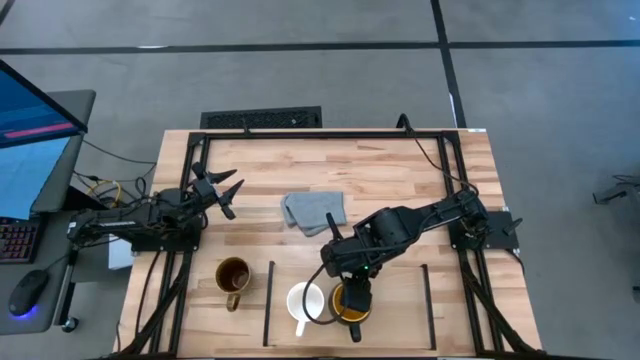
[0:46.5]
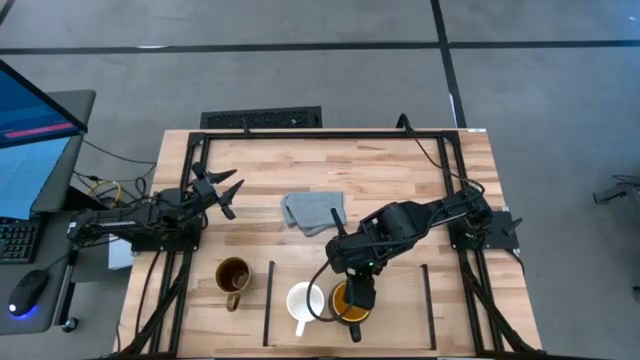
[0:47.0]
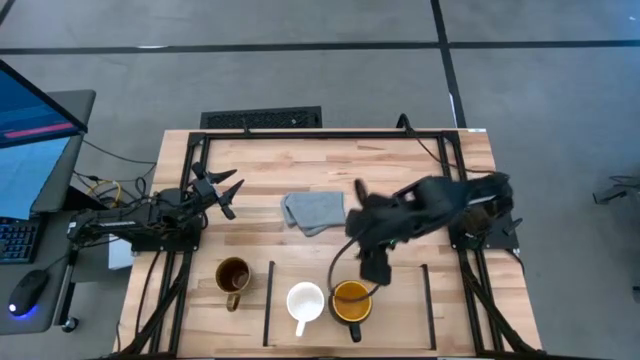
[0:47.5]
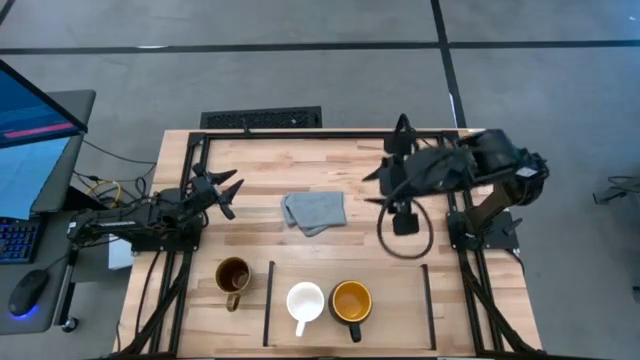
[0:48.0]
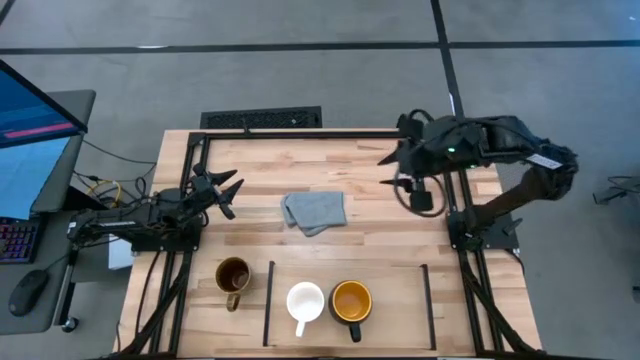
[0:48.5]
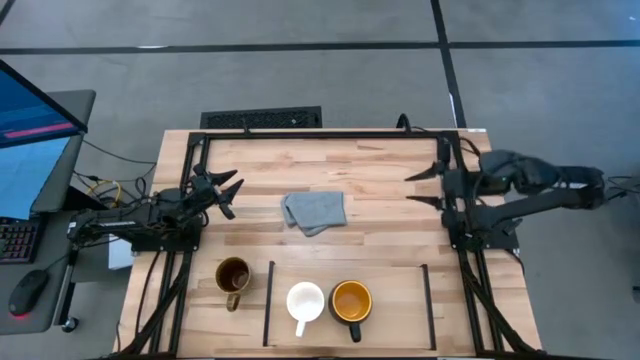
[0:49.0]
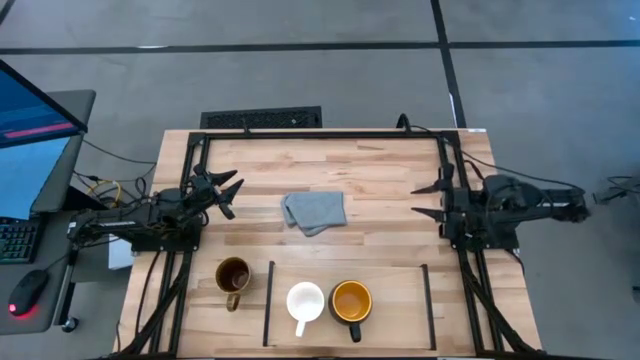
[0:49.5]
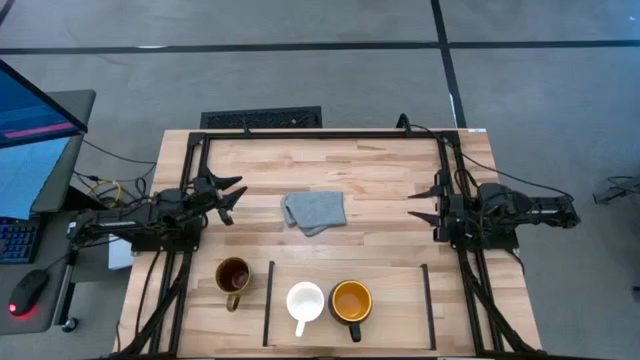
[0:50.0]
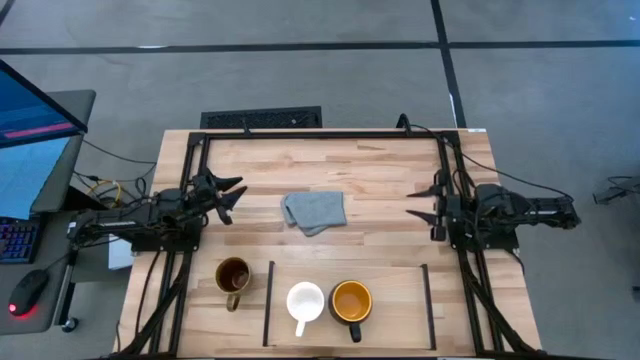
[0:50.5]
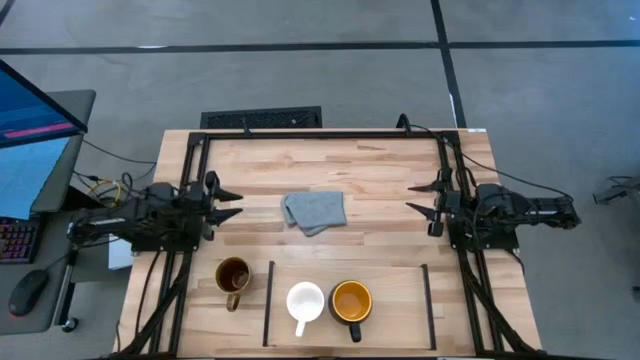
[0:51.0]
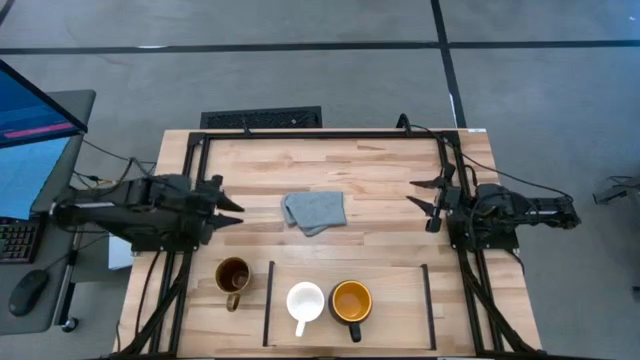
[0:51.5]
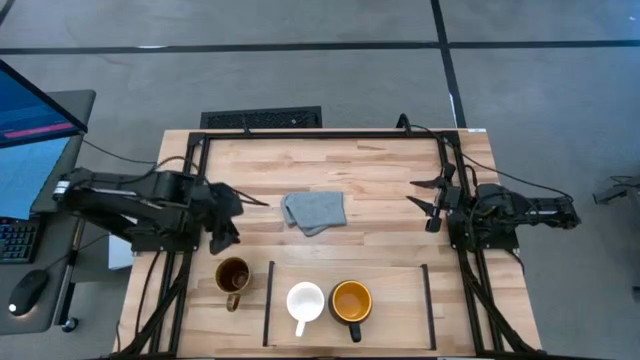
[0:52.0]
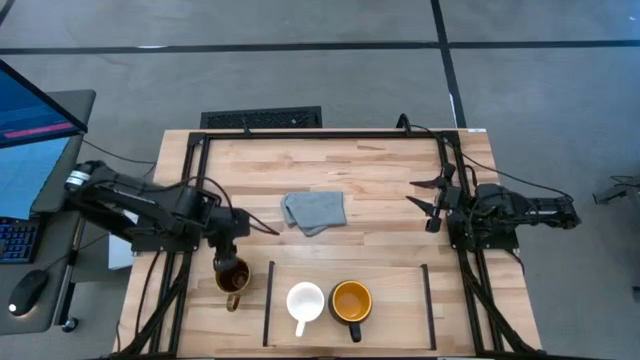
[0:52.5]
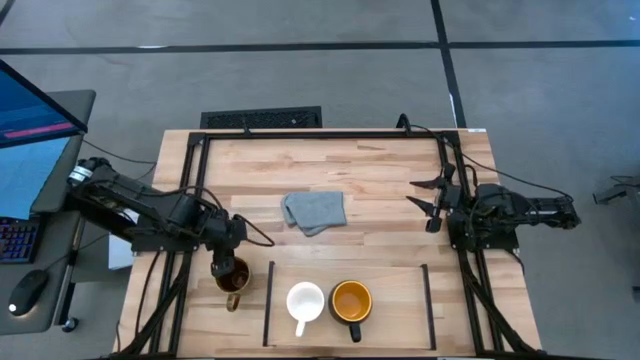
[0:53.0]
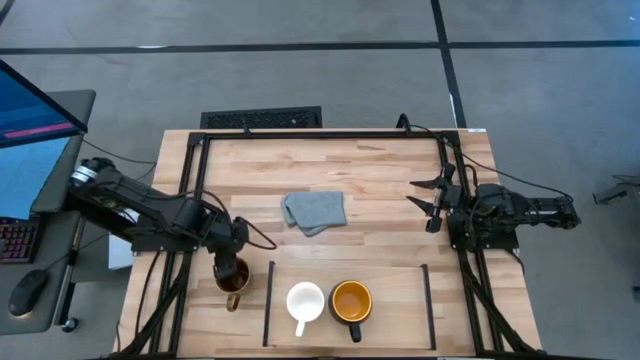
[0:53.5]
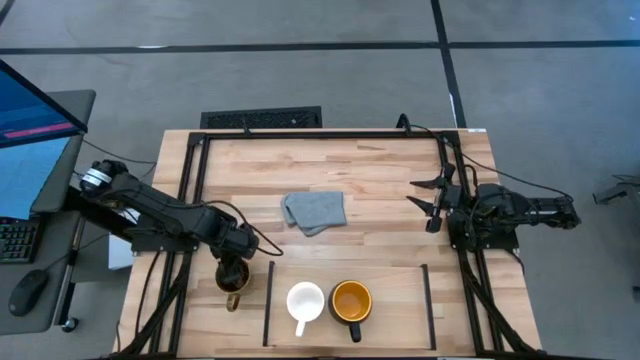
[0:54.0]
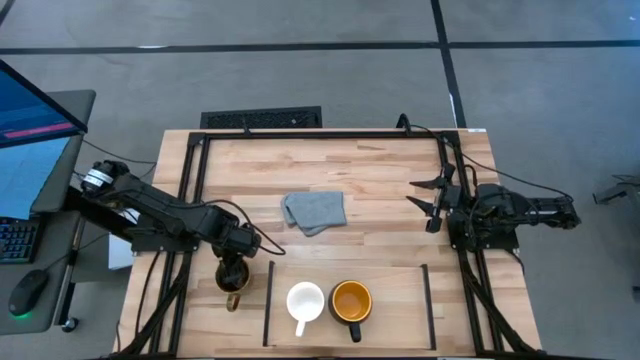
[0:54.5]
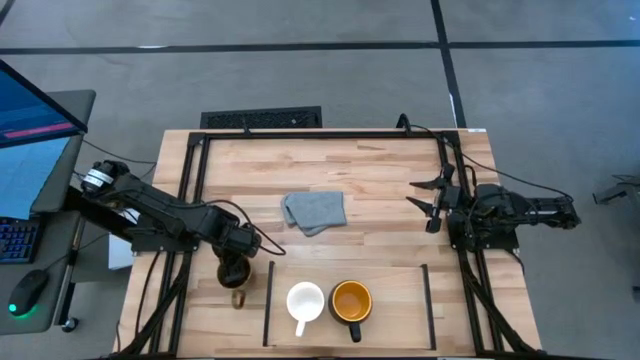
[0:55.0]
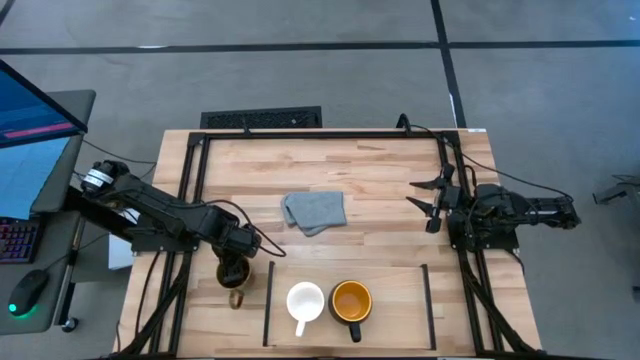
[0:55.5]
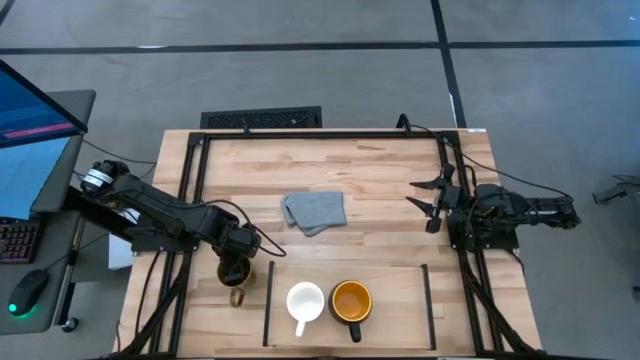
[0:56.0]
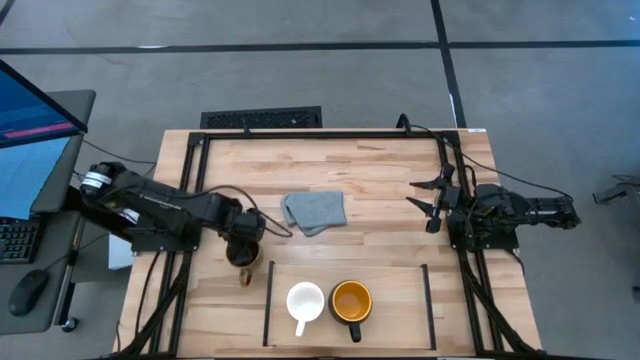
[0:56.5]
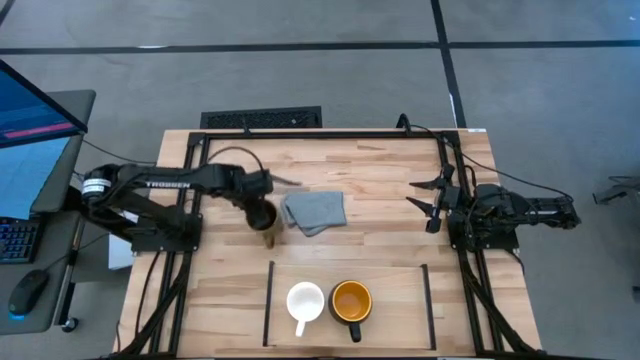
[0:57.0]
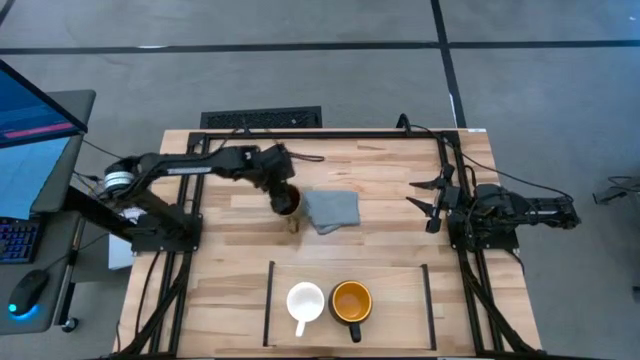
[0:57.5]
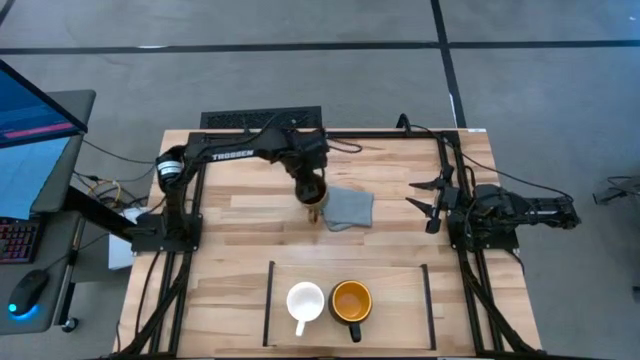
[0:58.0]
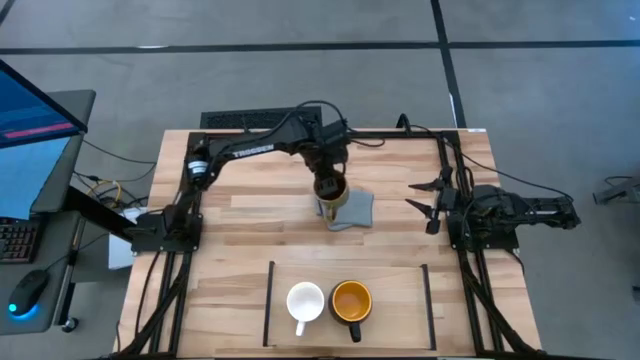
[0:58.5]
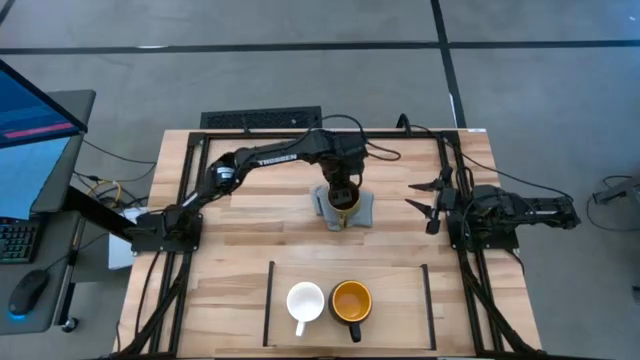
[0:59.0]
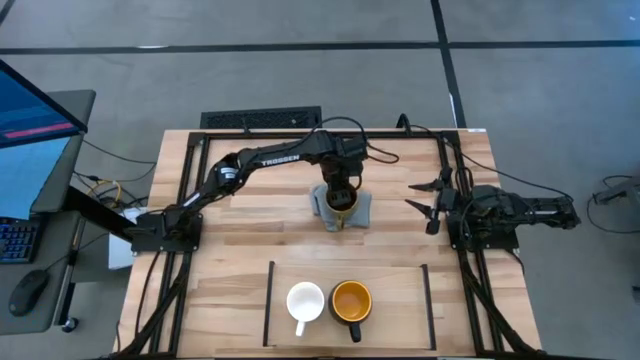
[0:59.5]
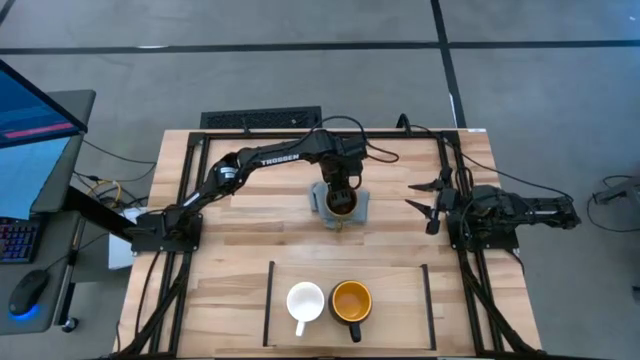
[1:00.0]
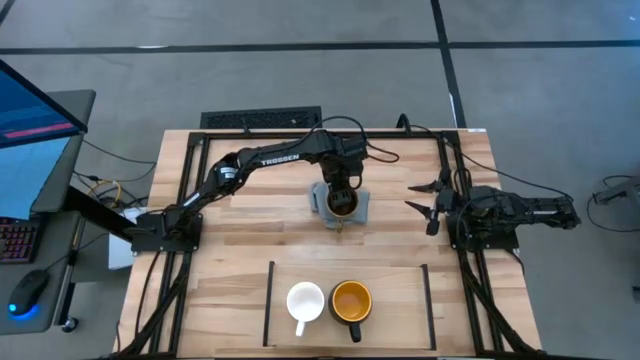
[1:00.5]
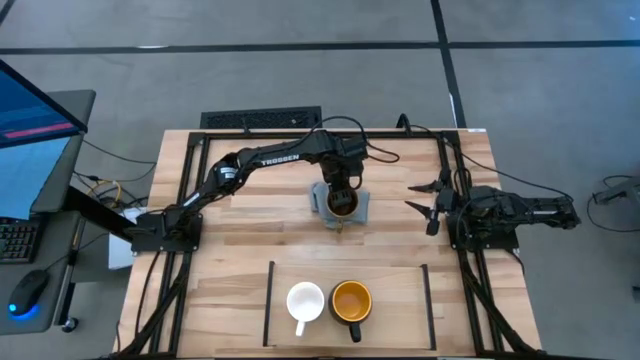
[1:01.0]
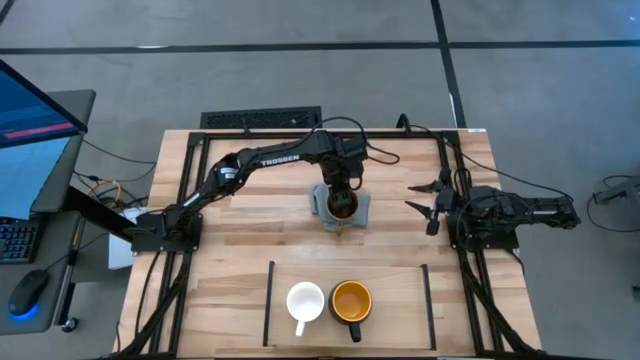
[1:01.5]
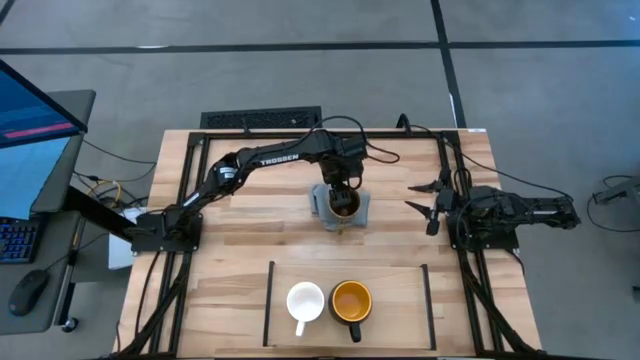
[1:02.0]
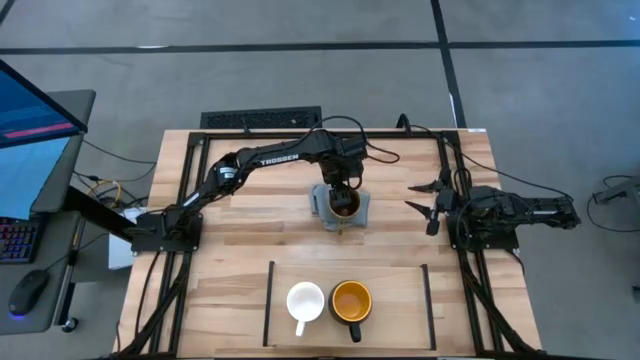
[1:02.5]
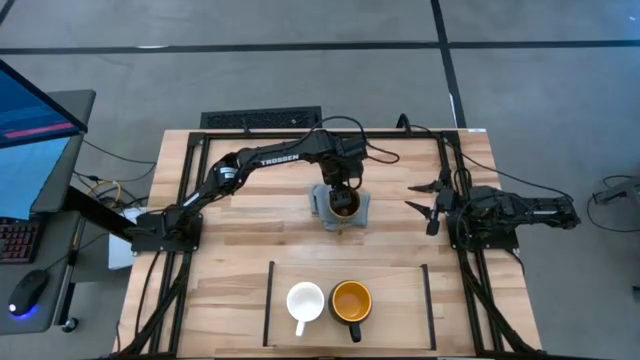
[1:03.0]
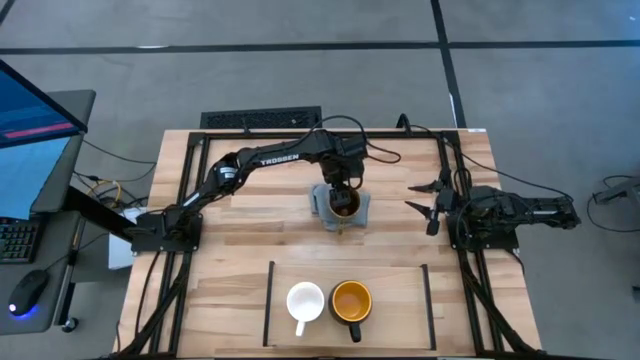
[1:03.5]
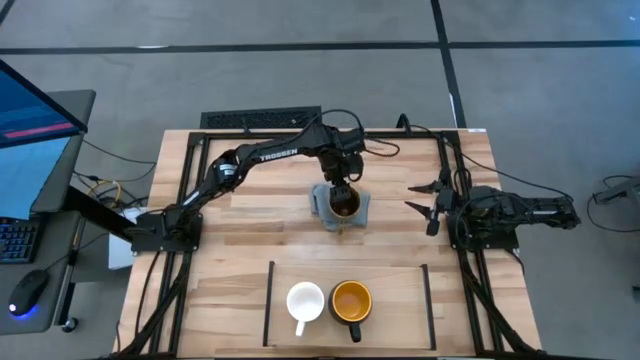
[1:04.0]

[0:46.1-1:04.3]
Task: Stack small to large cups/mugs on shelf
Put the light brown mug on the shelf
